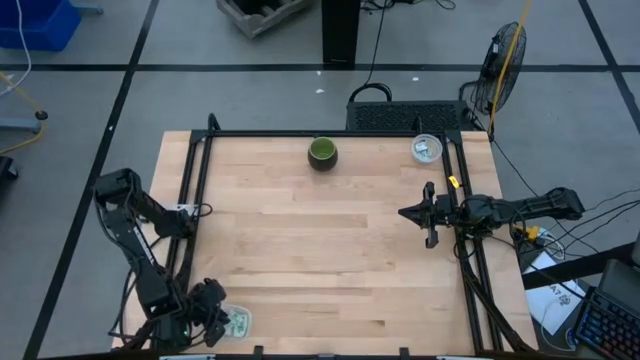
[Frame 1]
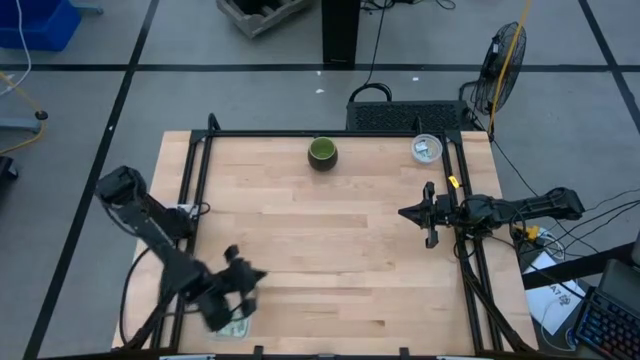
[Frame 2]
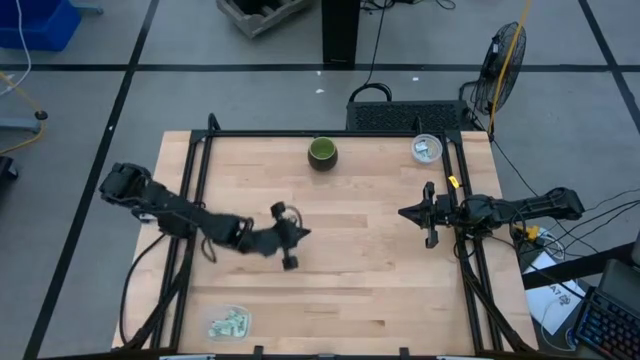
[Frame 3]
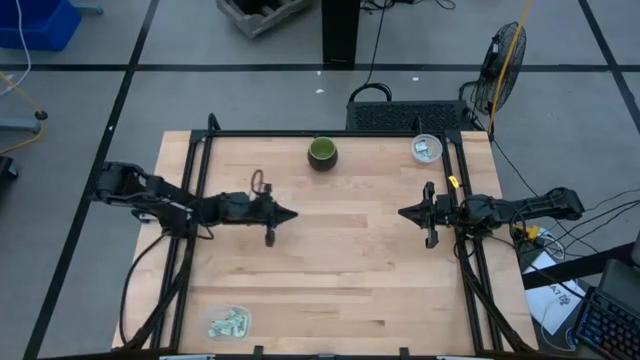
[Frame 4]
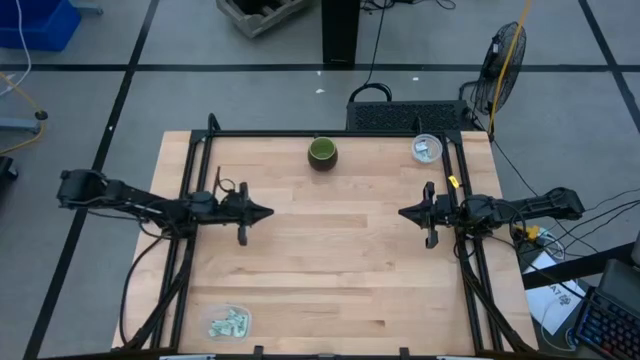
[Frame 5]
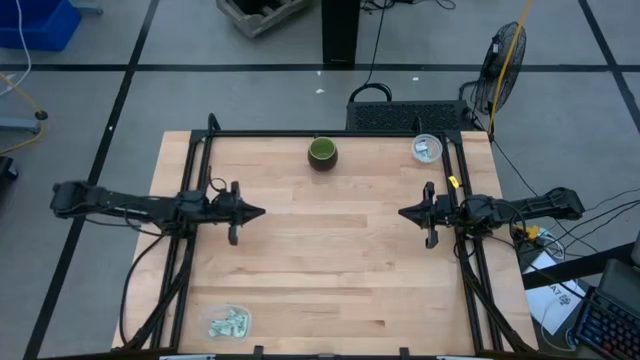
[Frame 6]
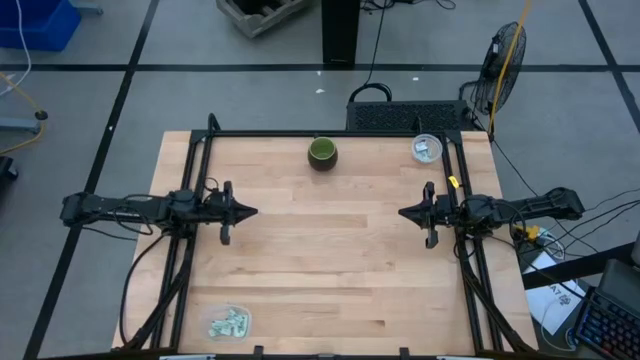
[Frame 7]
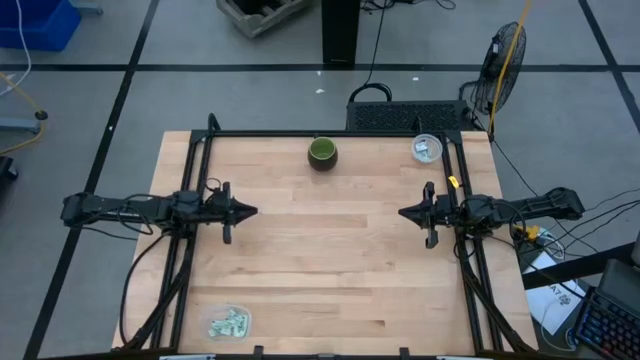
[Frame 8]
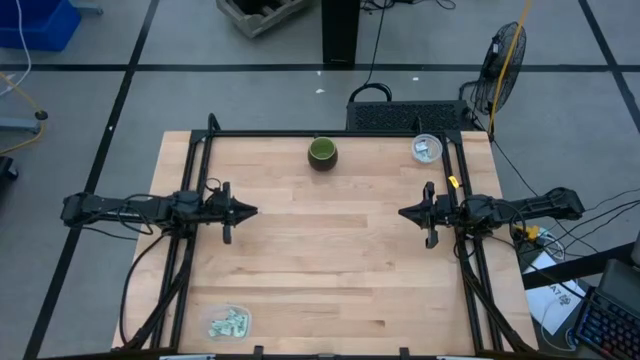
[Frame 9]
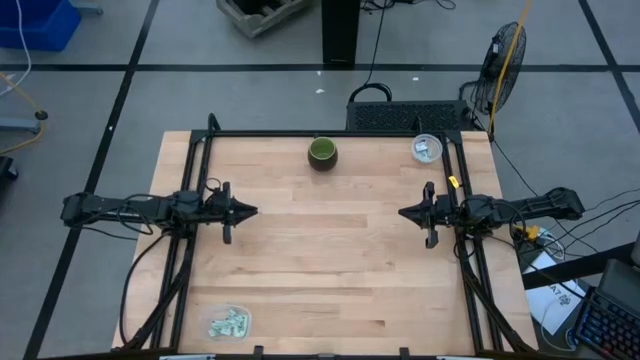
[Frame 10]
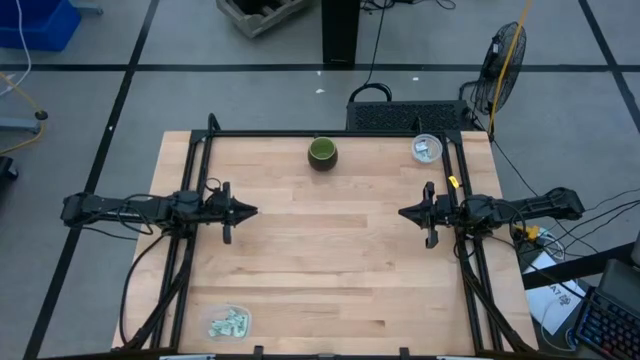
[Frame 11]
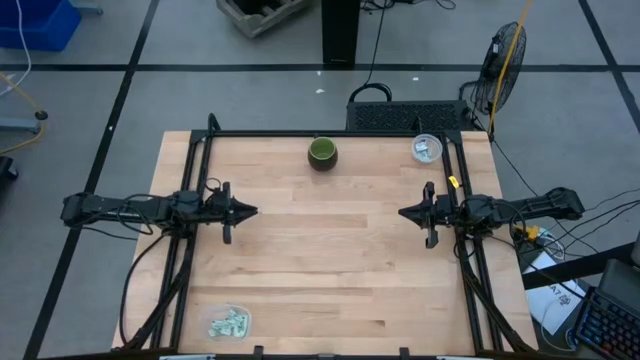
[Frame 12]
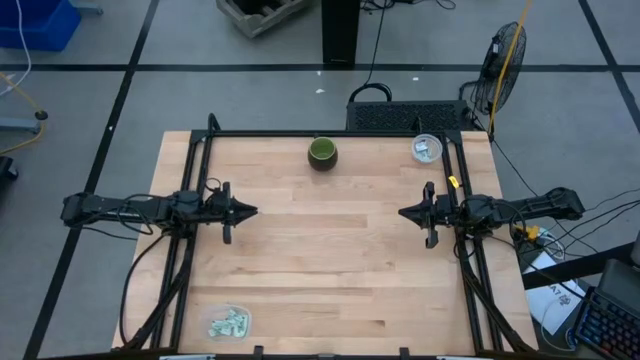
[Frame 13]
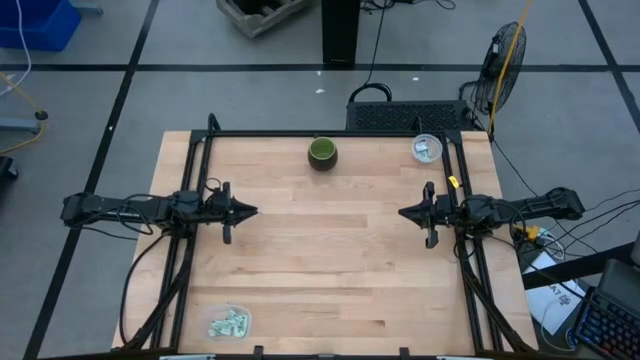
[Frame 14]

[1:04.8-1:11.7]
Task: Pick and place items into bin
Return to Home Position

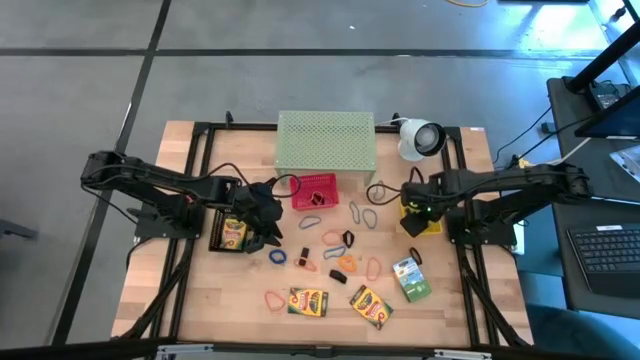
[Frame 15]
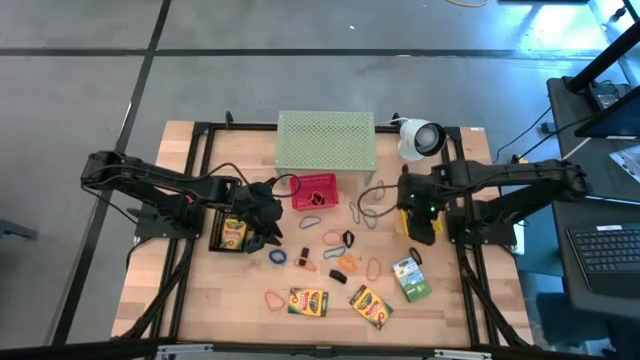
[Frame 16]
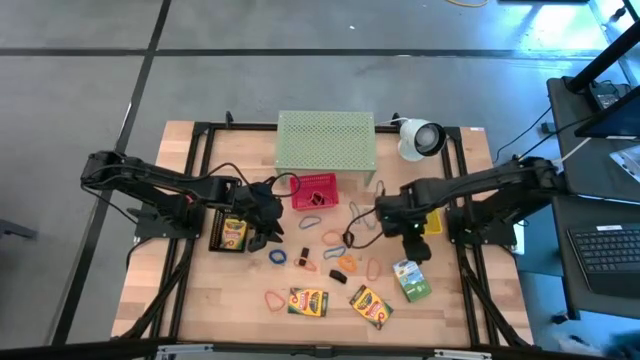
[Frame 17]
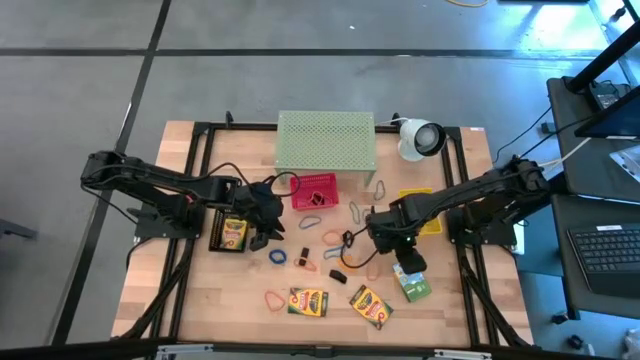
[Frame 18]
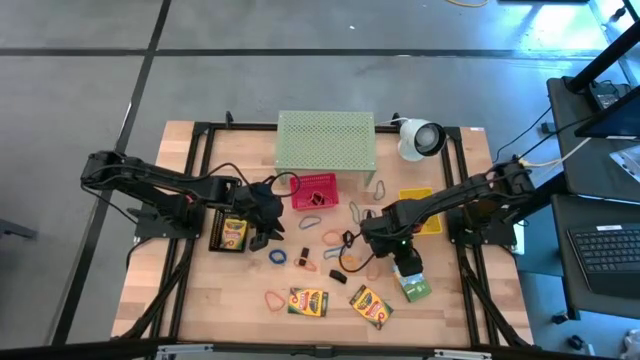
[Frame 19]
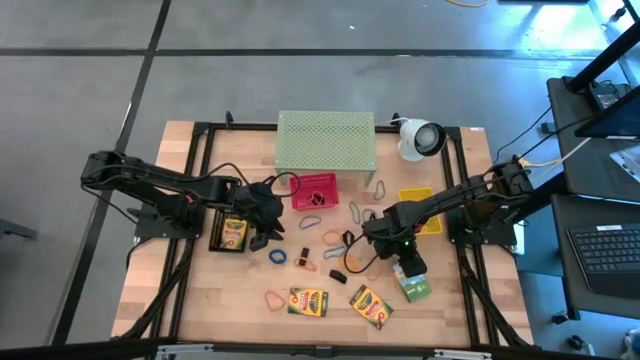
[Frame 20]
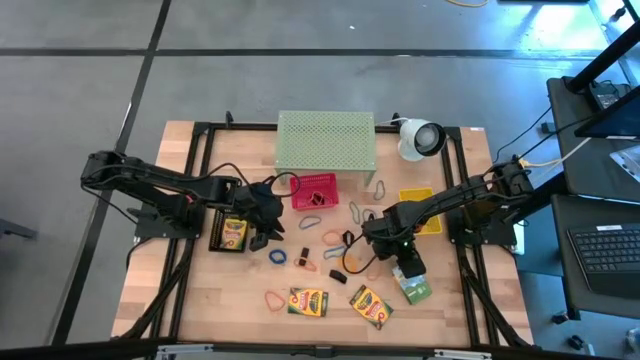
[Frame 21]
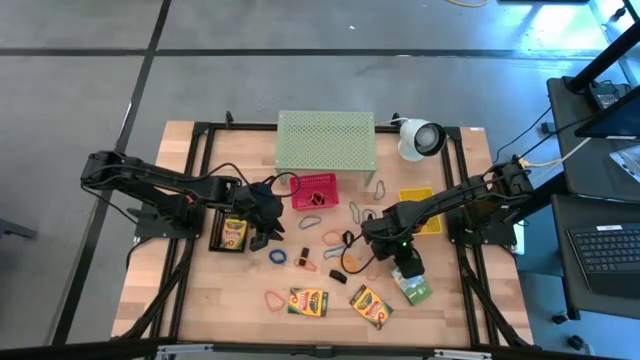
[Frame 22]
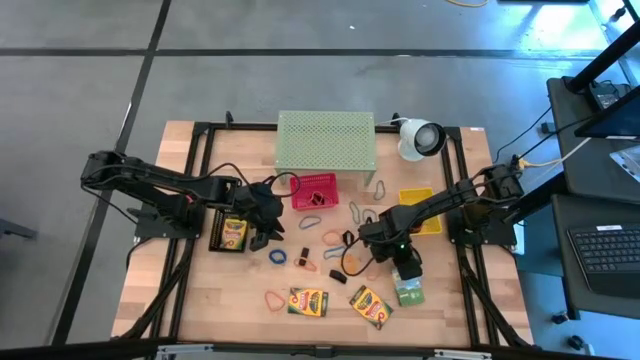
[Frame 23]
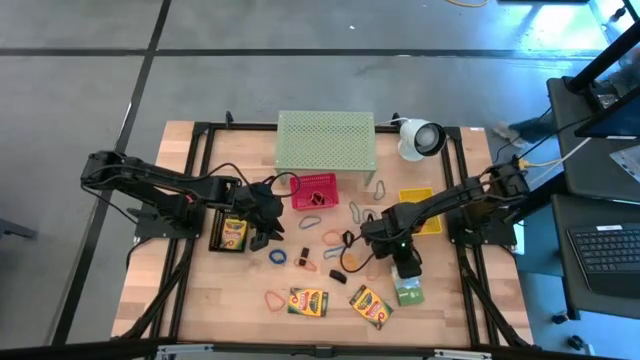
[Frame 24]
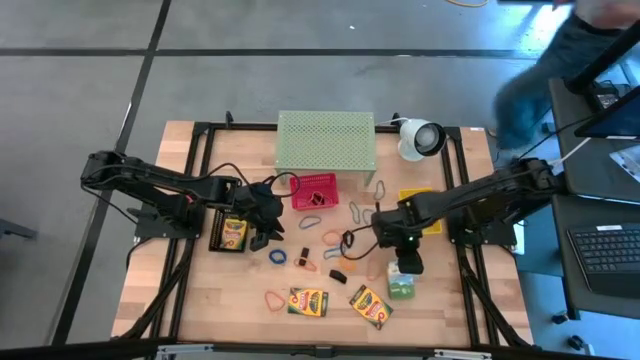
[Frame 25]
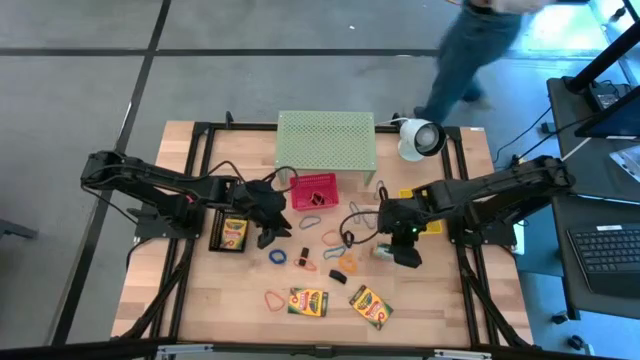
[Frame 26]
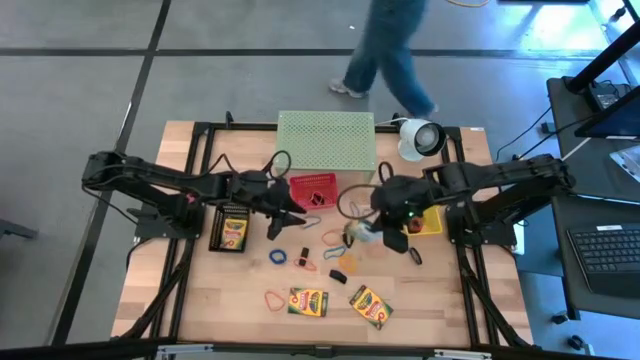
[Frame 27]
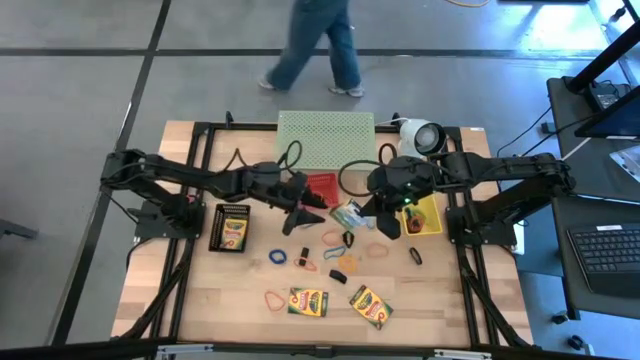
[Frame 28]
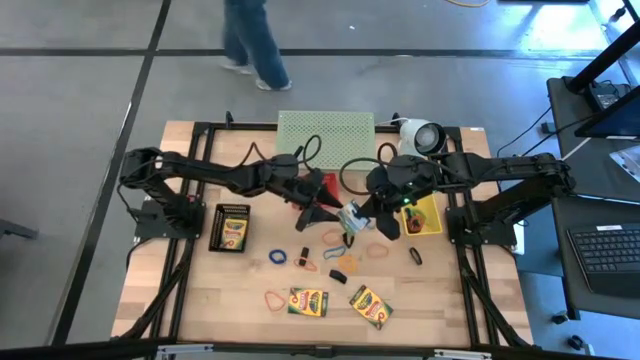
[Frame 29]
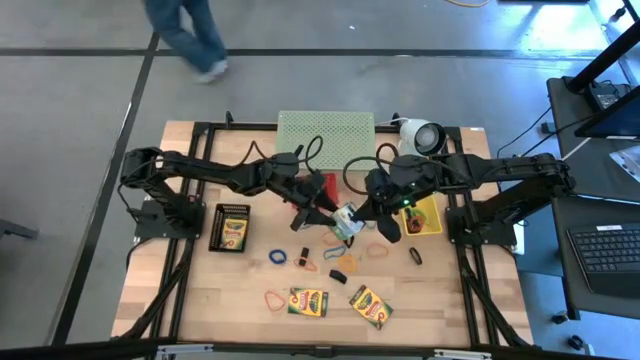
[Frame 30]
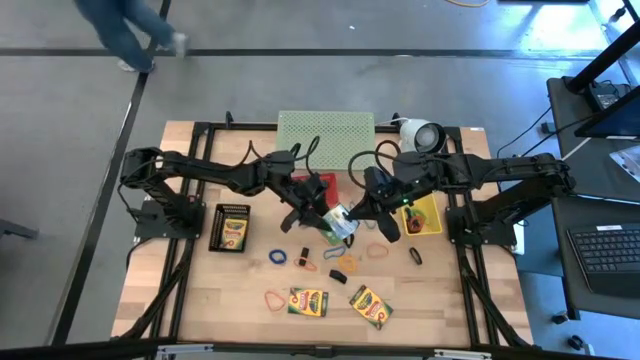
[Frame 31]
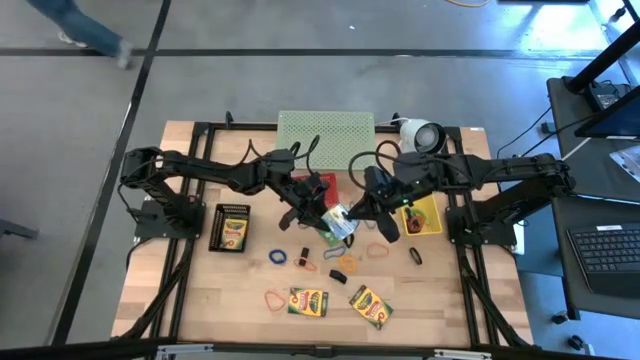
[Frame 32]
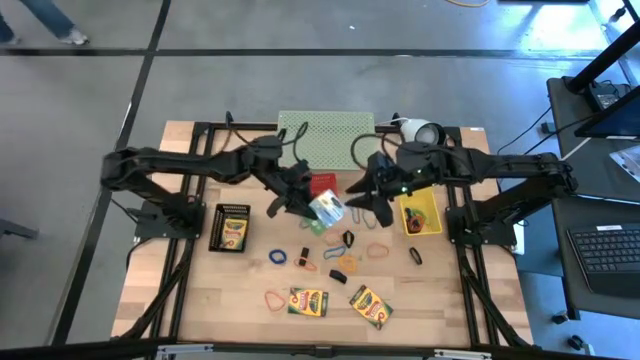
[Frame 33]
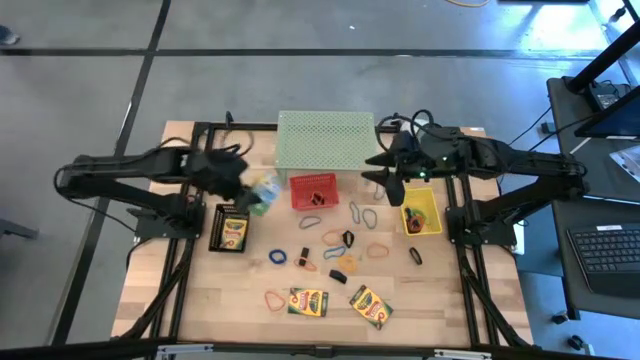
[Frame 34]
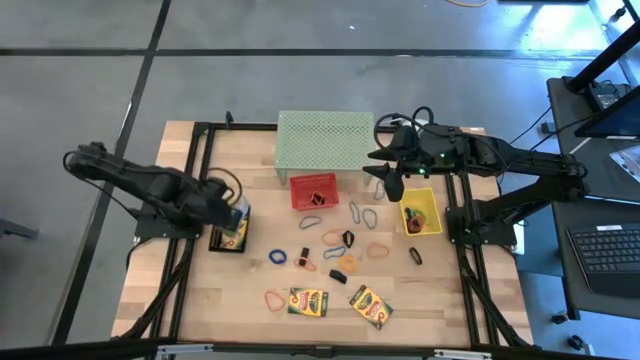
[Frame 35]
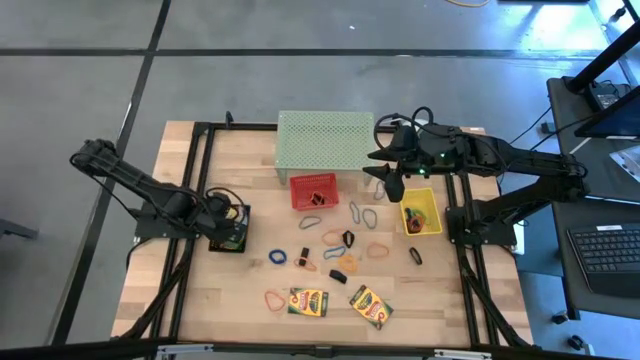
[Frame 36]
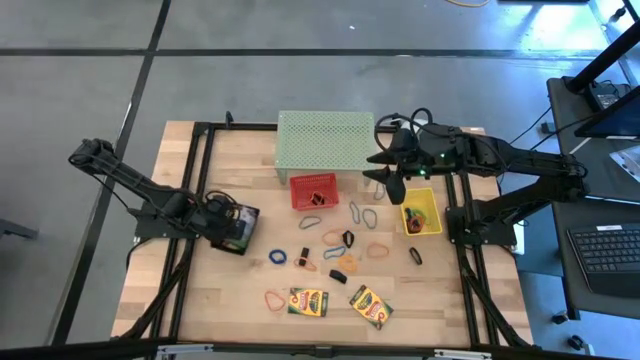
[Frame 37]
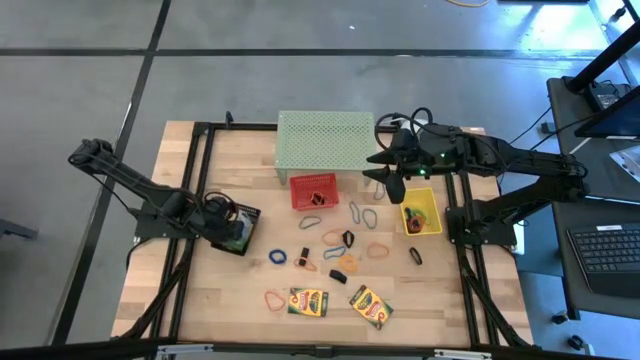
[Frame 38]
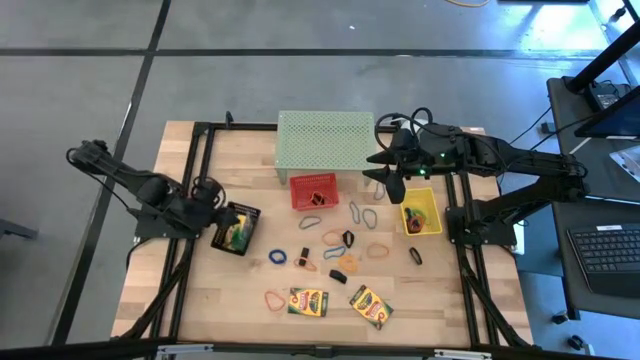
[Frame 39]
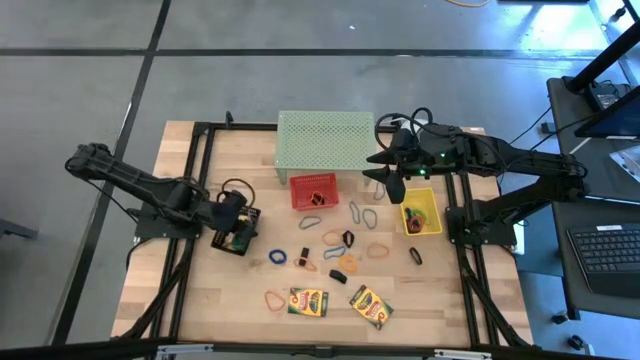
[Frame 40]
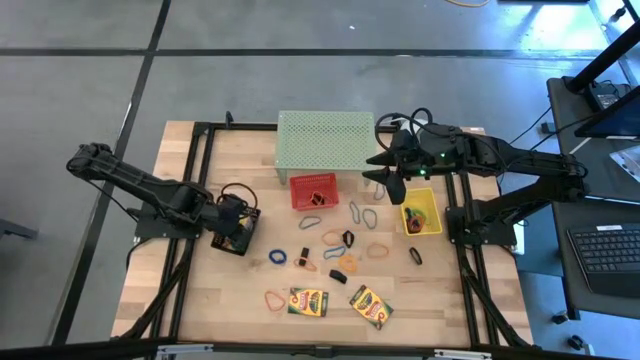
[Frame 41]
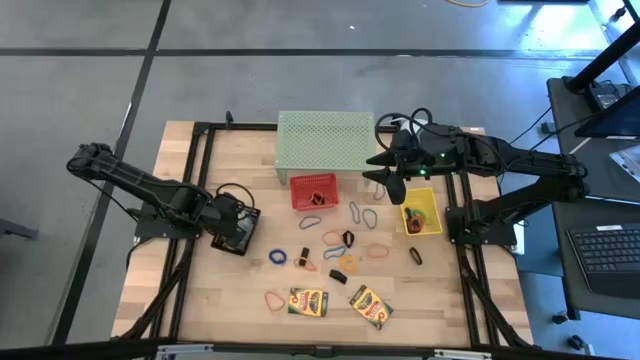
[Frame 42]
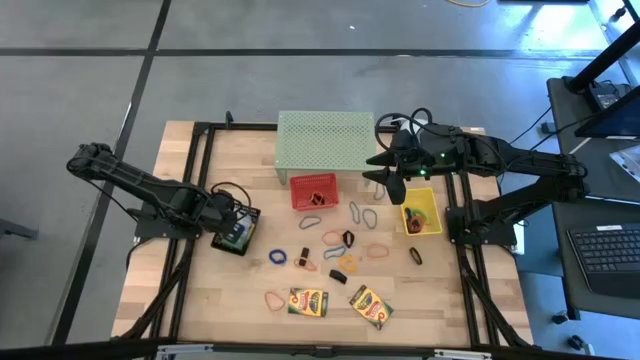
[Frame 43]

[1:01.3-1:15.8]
Task: Pick & Place Office Desk Supplies
Put the yellow crayon box into the black bin
